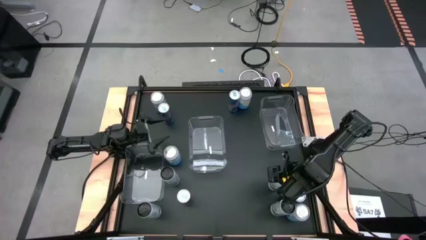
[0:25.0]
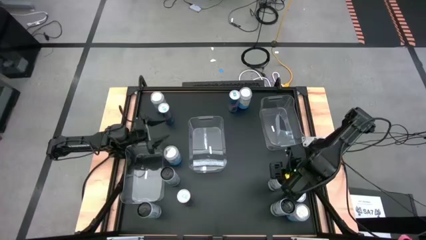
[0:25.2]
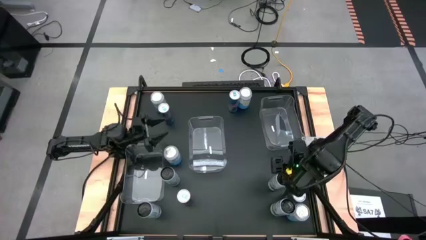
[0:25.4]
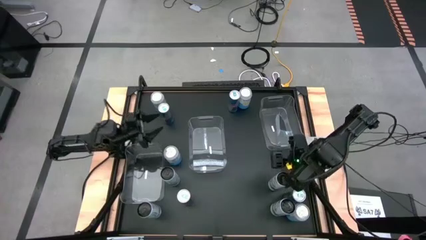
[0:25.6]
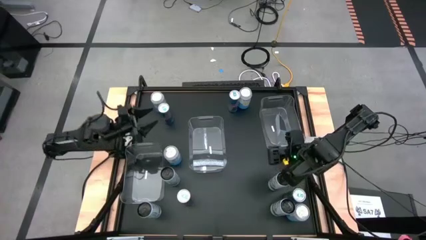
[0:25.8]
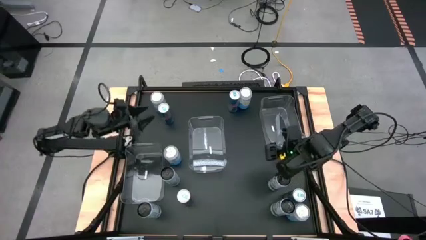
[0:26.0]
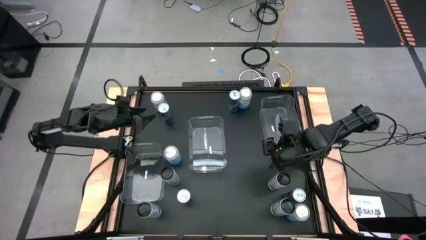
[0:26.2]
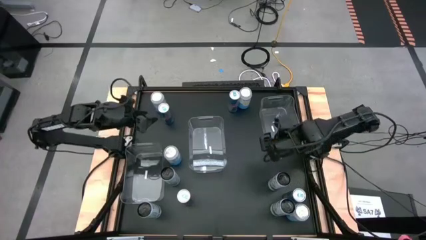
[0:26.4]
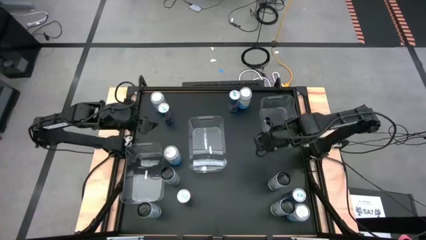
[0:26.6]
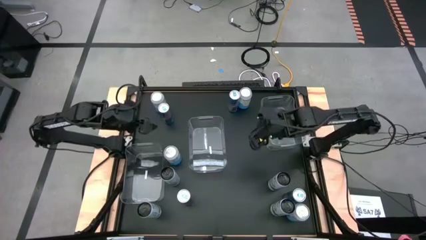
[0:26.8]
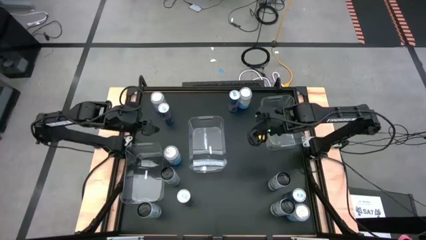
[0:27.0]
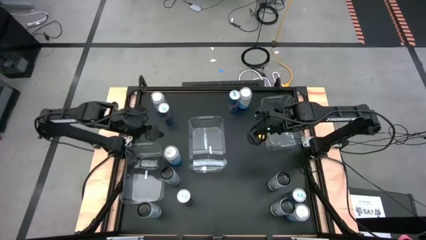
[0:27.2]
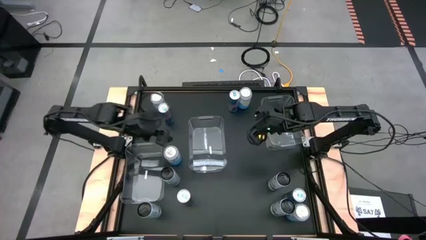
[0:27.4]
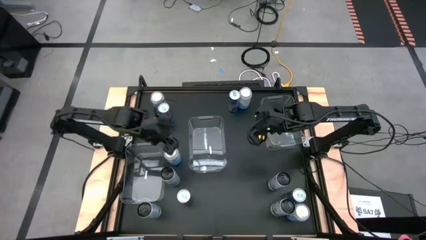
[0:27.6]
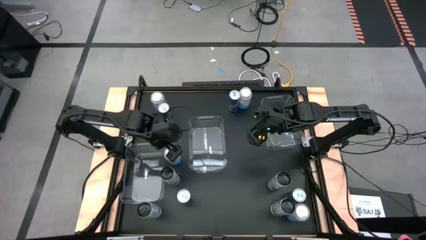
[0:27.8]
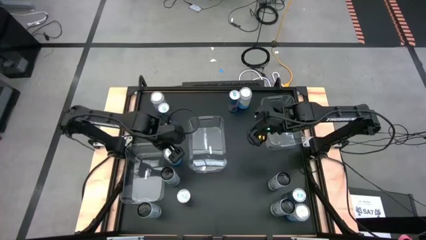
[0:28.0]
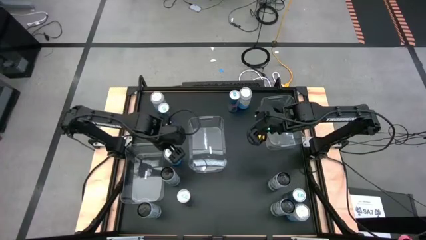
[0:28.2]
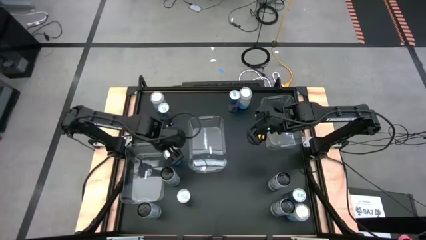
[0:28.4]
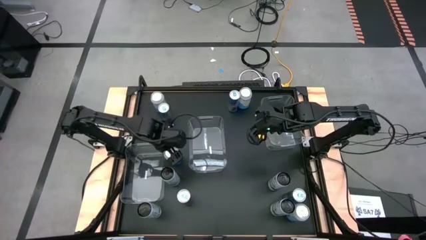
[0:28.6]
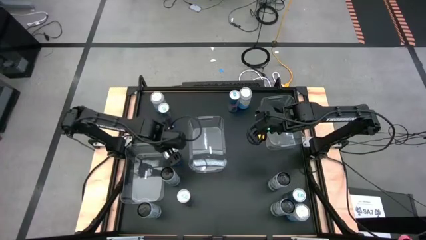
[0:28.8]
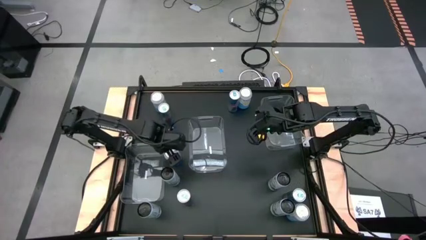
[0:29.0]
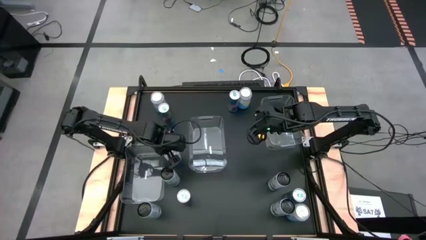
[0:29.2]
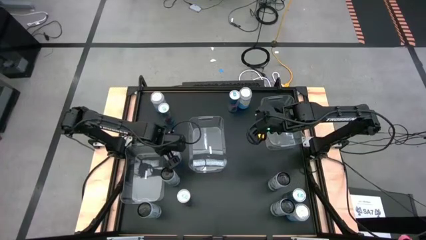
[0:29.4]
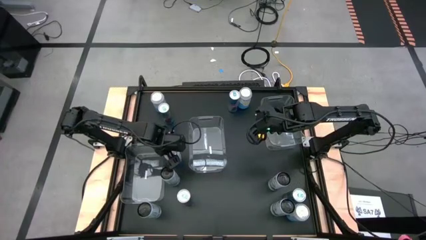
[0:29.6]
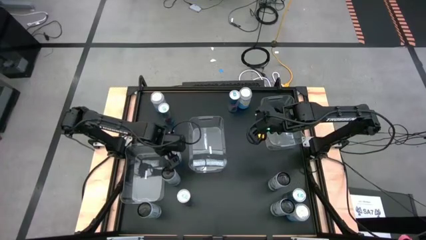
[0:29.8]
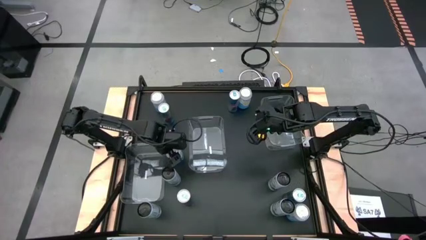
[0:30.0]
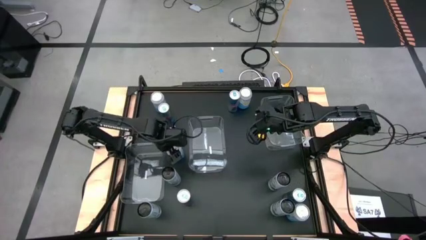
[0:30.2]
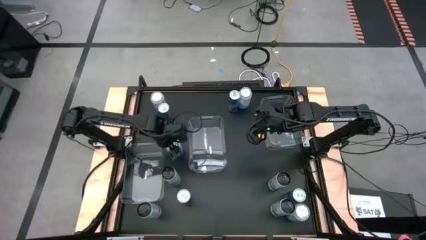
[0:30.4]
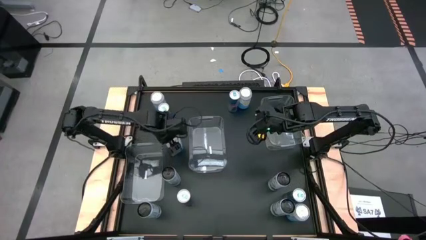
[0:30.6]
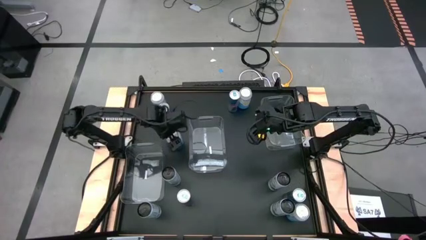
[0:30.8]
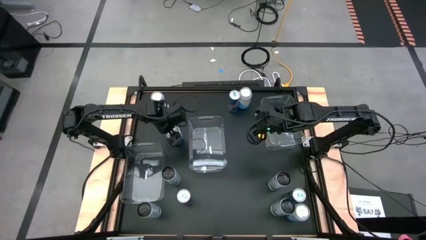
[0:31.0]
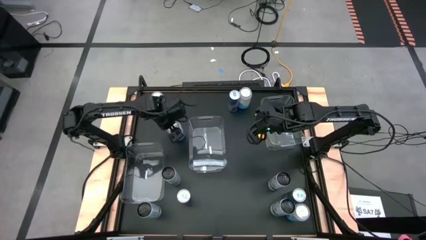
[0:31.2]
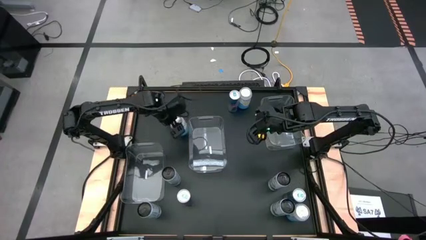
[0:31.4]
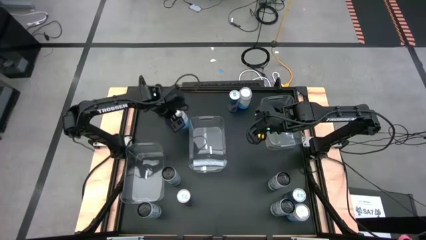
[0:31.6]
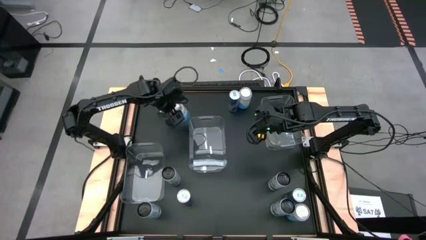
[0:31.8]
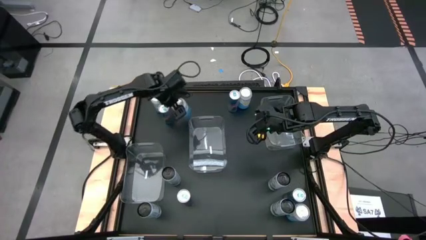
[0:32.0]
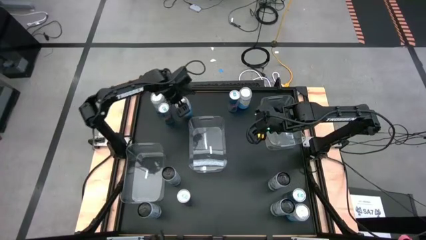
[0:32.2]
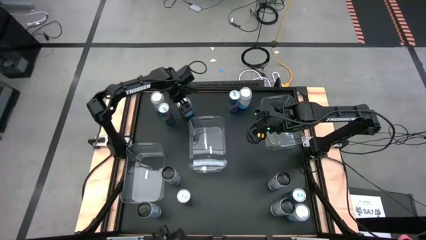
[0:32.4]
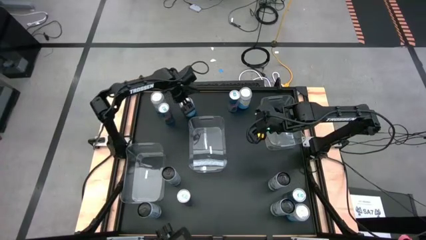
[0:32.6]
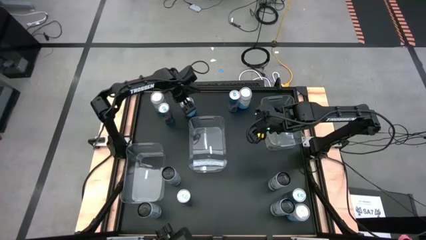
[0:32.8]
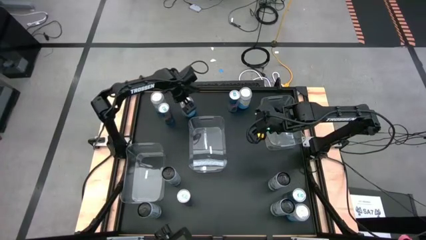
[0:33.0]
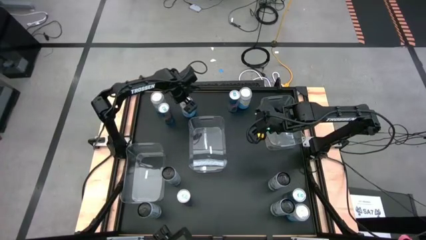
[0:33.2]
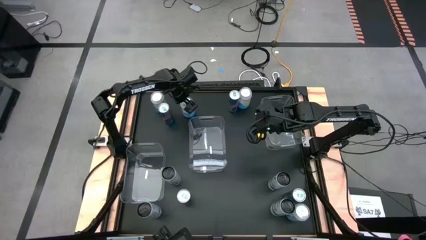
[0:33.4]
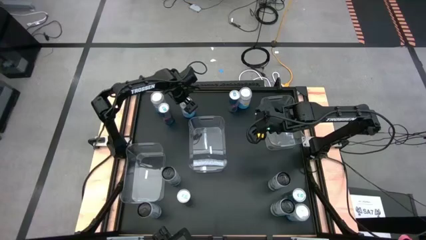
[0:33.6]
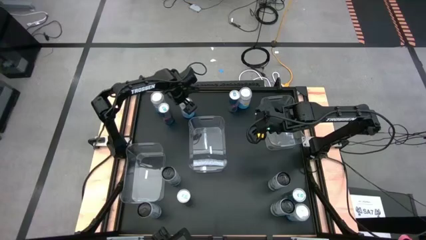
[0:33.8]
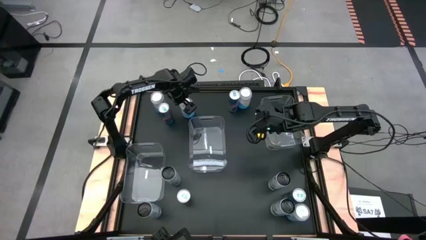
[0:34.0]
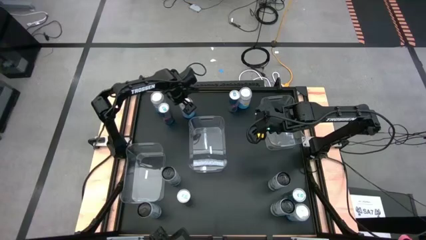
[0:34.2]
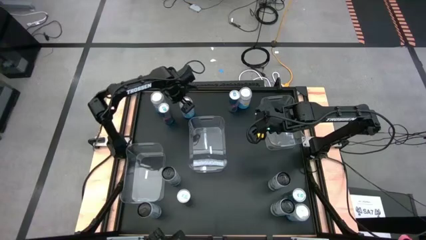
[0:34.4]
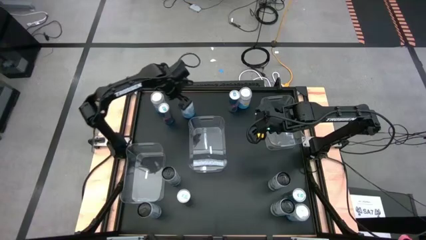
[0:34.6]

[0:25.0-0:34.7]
Task: Sort soda cans
Move the white and blue soda can to the top left of the table

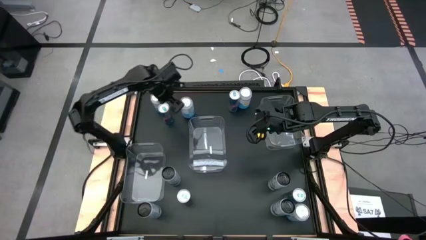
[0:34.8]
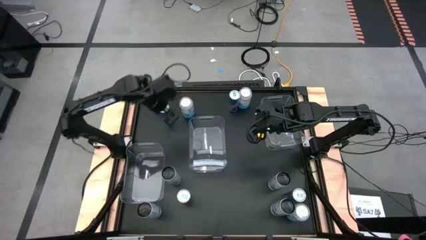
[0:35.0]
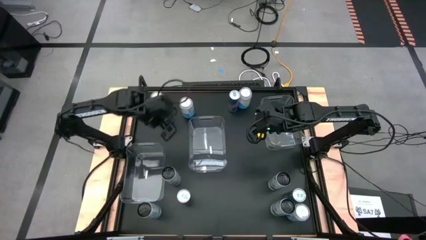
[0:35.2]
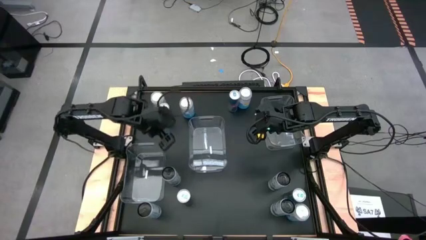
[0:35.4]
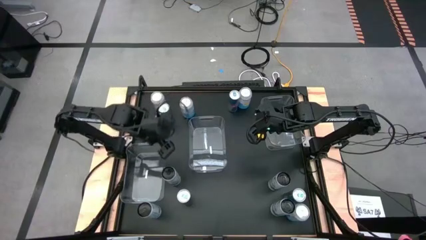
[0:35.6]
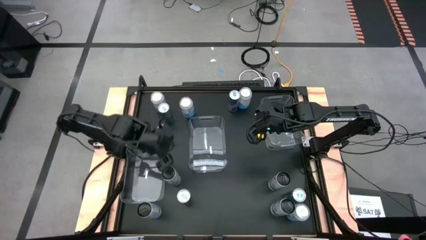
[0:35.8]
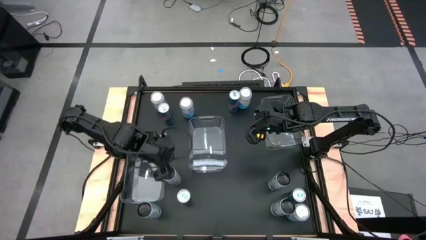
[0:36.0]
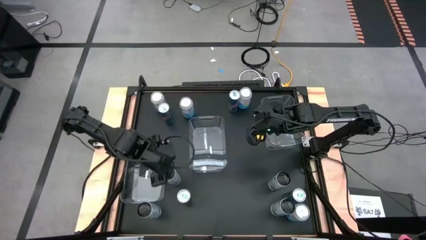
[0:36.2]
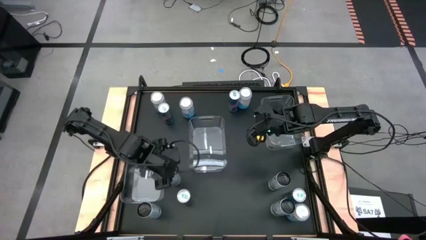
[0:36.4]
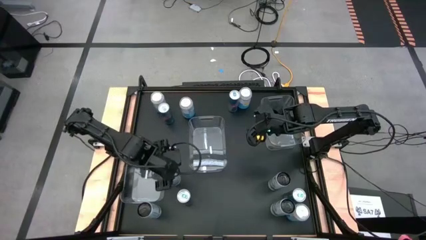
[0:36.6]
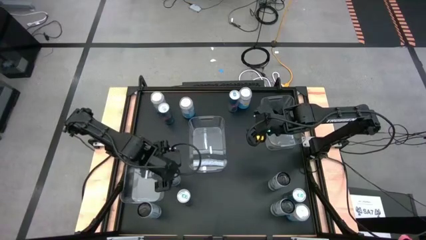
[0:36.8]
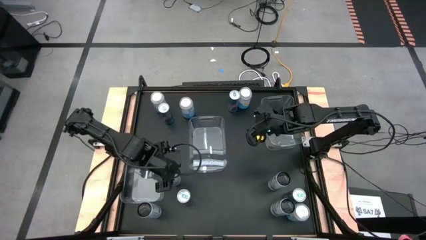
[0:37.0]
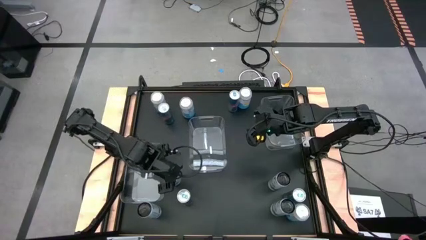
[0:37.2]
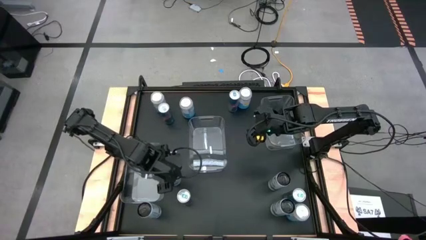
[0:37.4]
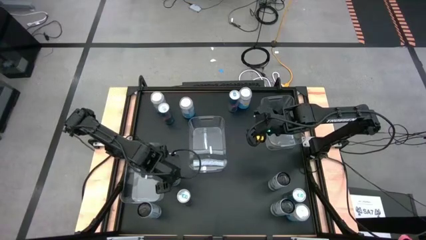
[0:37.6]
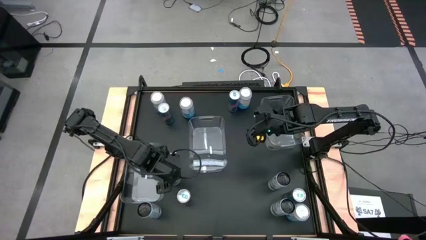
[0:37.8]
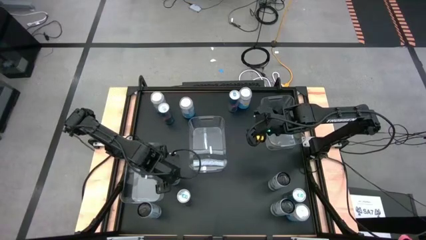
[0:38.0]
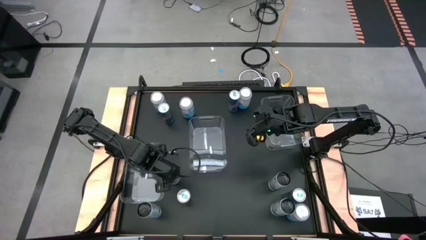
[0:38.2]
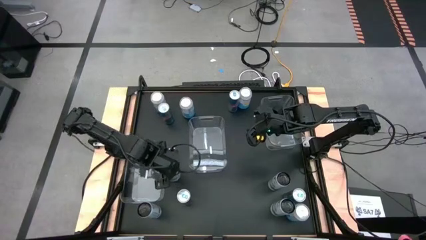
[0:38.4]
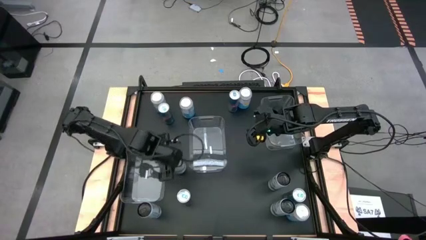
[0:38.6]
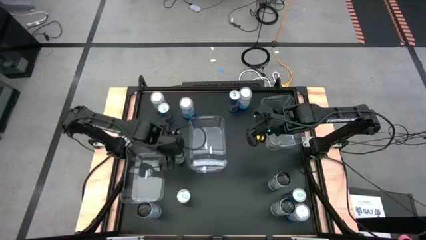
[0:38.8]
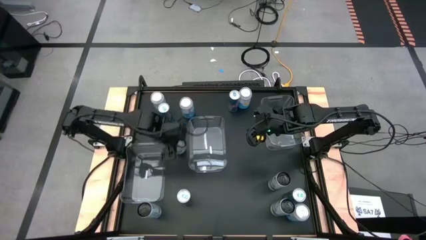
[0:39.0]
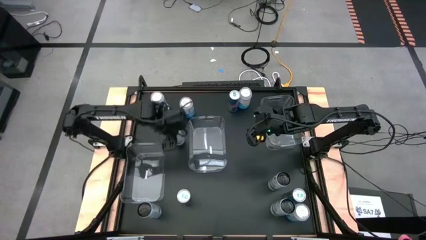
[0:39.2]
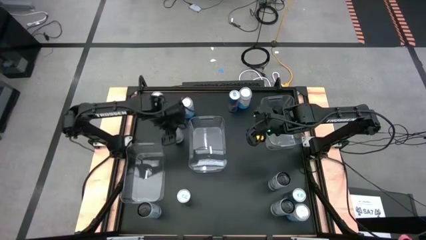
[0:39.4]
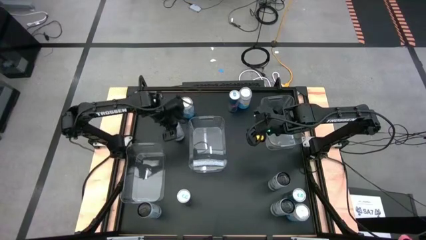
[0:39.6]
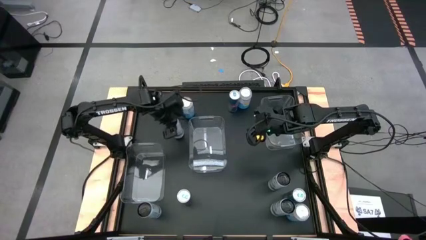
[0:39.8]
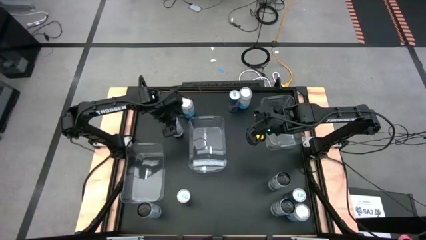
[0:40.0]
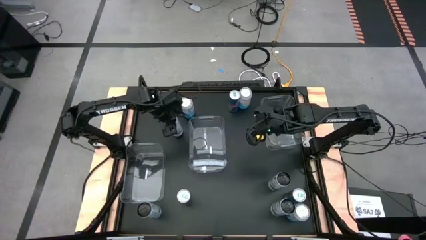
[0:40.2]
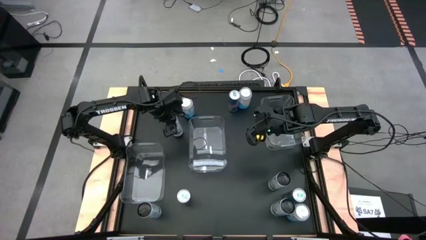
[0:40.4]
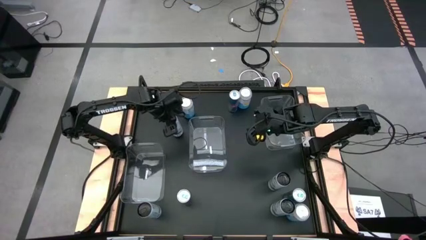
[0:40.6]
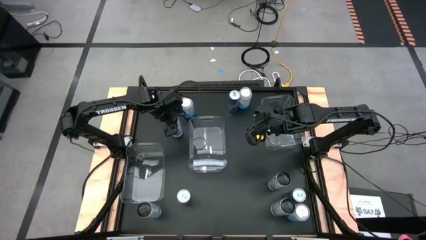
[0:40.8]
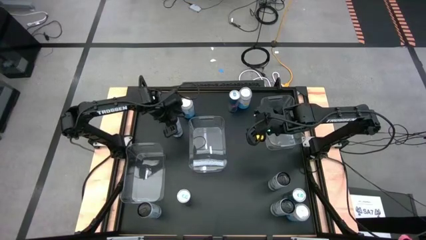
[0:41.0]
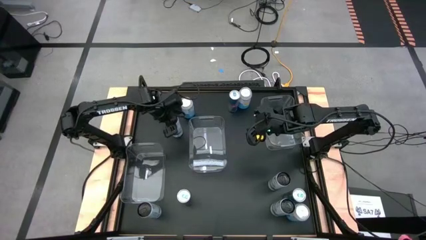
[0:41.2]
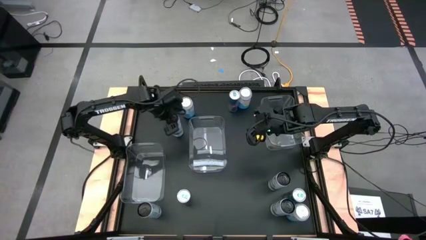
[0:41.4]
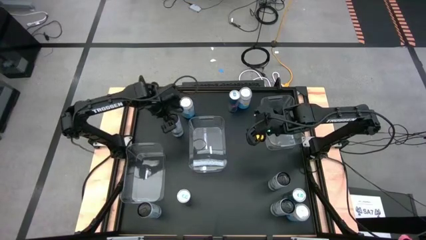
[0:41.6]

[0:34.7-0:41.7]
Move the white soda can to the top left of the table
